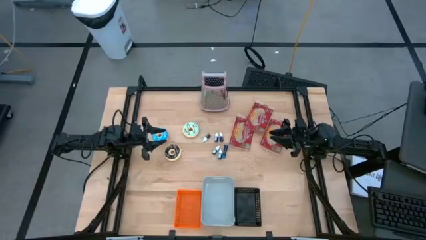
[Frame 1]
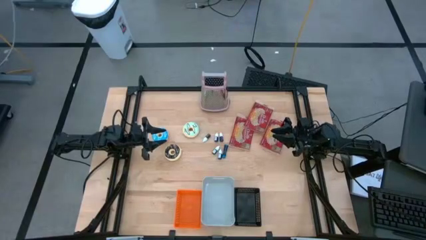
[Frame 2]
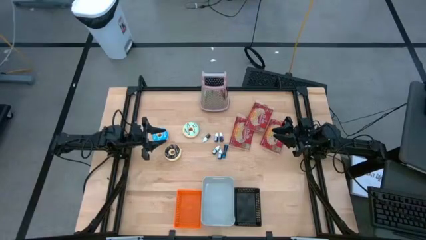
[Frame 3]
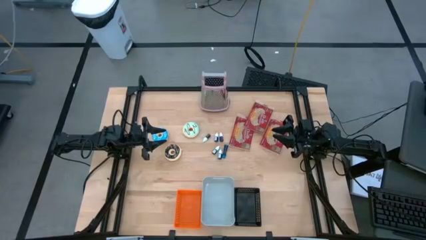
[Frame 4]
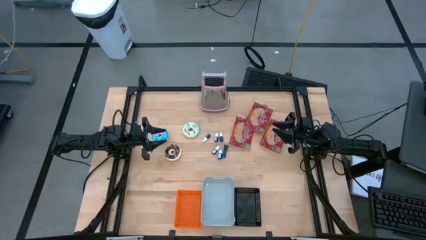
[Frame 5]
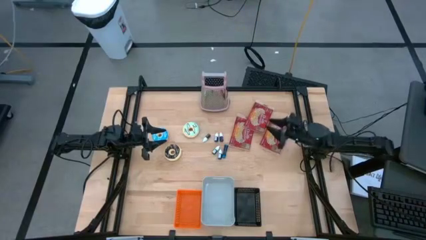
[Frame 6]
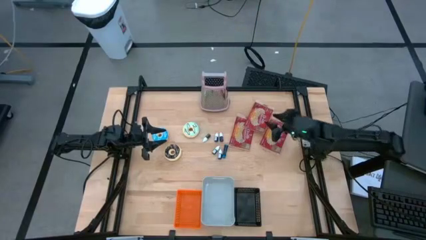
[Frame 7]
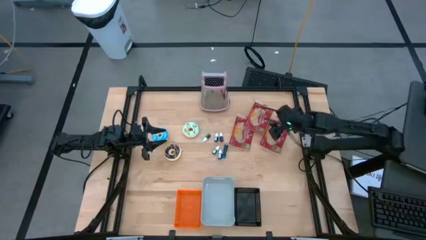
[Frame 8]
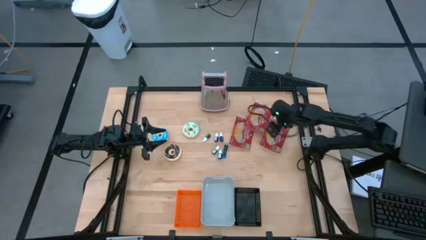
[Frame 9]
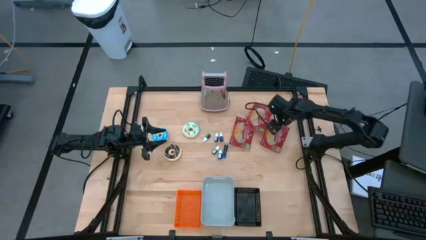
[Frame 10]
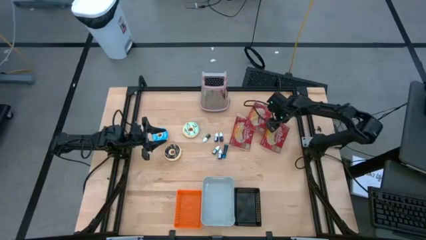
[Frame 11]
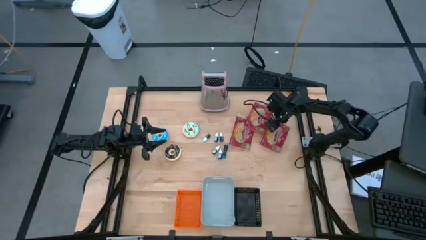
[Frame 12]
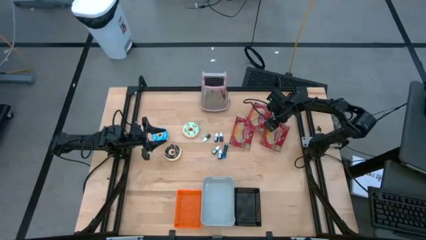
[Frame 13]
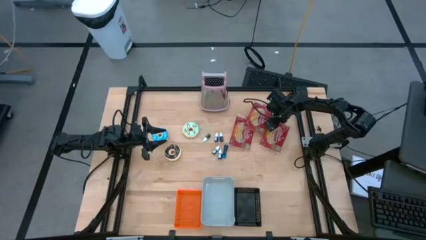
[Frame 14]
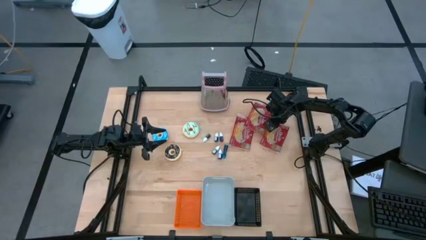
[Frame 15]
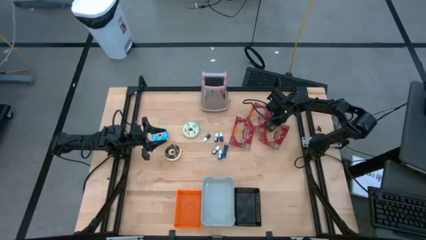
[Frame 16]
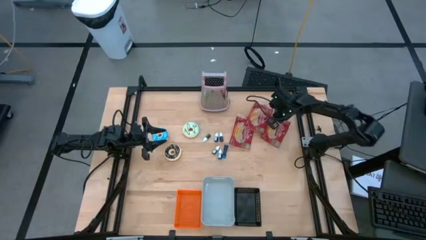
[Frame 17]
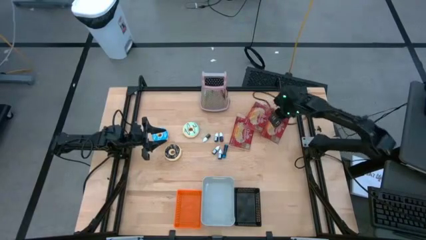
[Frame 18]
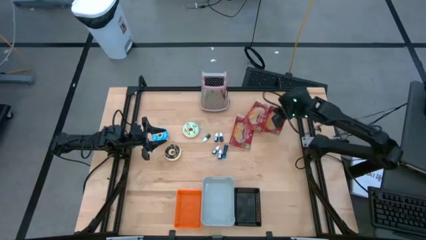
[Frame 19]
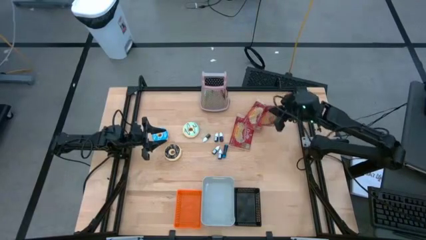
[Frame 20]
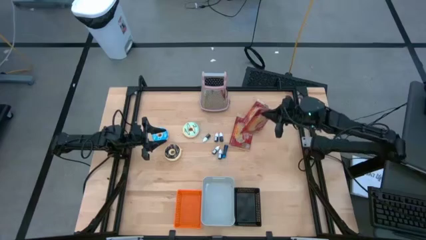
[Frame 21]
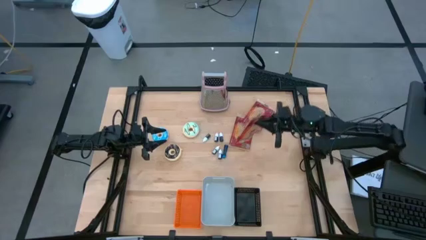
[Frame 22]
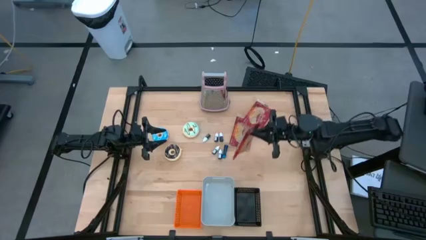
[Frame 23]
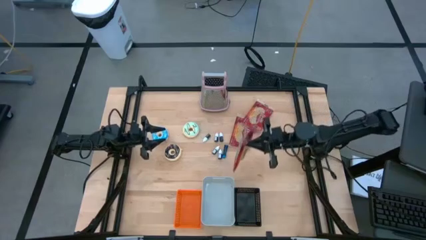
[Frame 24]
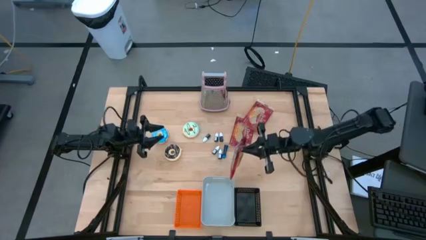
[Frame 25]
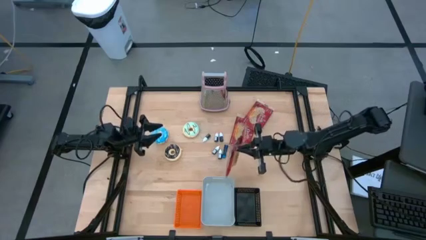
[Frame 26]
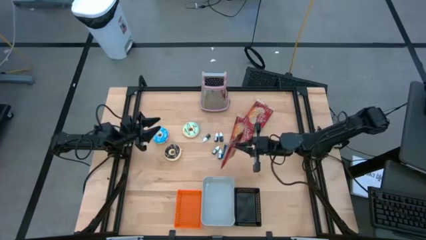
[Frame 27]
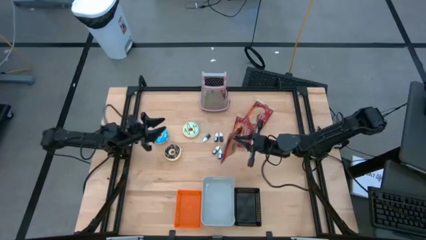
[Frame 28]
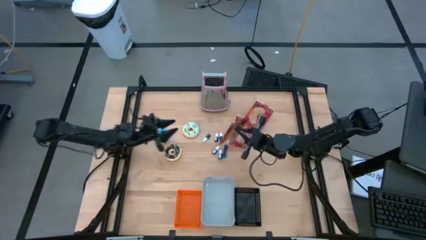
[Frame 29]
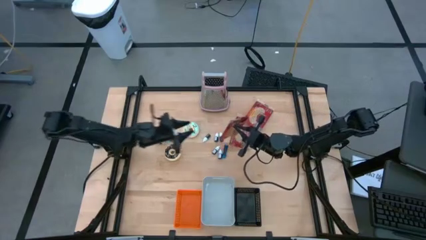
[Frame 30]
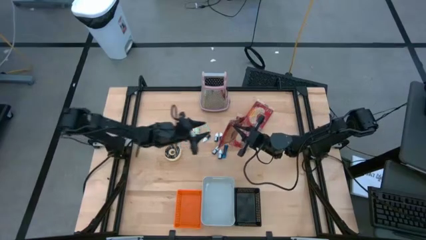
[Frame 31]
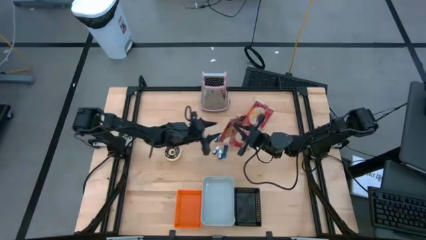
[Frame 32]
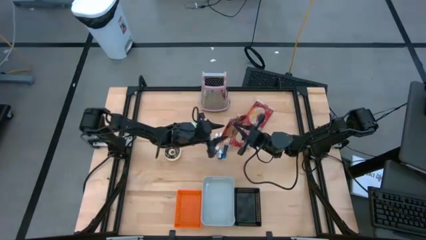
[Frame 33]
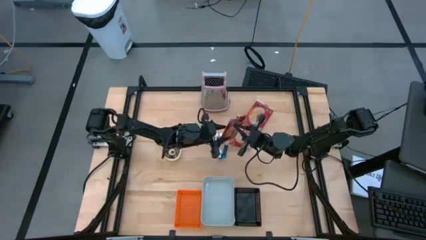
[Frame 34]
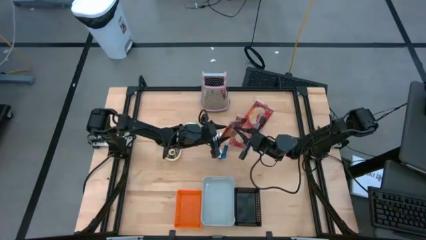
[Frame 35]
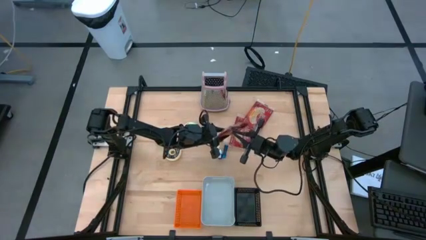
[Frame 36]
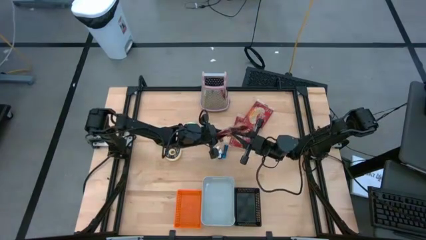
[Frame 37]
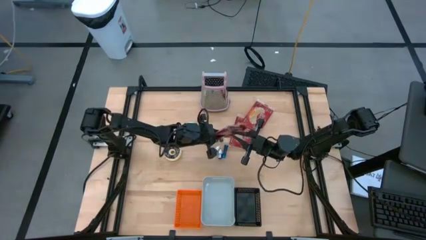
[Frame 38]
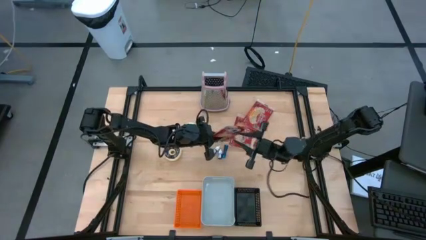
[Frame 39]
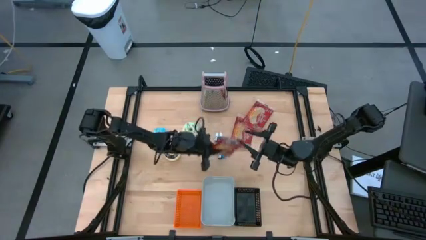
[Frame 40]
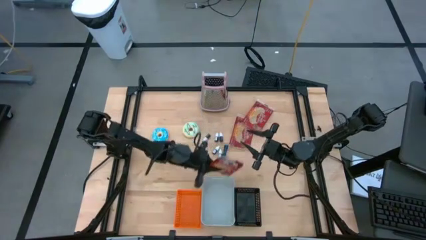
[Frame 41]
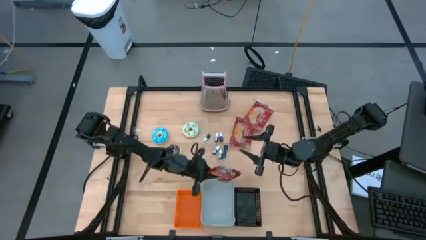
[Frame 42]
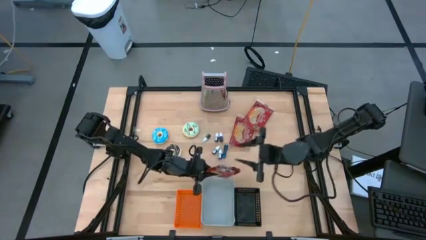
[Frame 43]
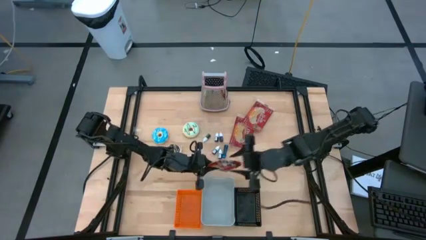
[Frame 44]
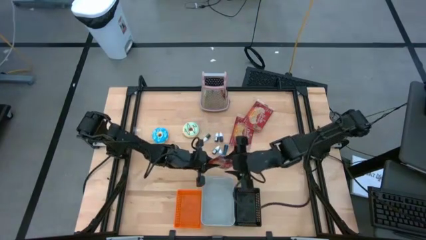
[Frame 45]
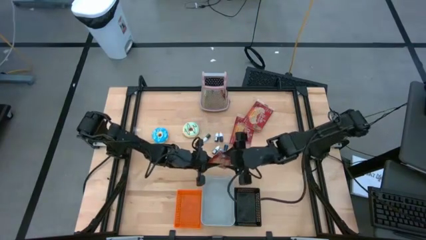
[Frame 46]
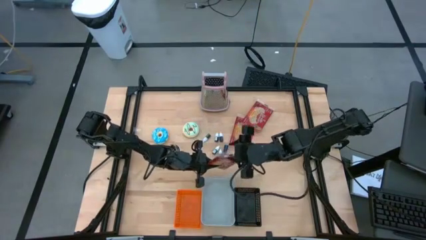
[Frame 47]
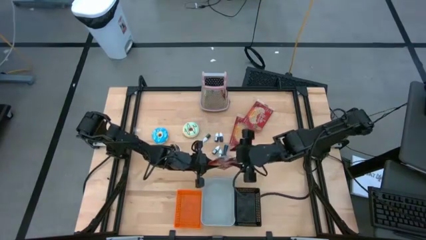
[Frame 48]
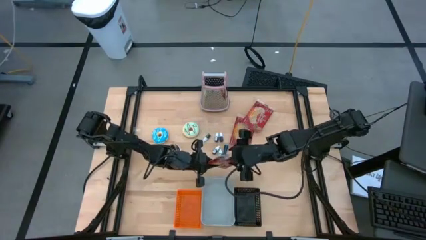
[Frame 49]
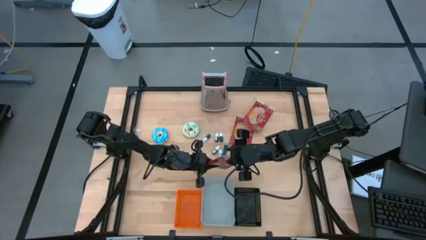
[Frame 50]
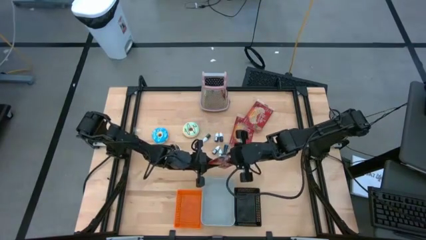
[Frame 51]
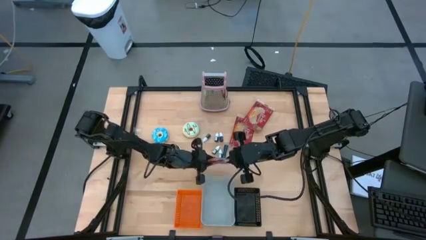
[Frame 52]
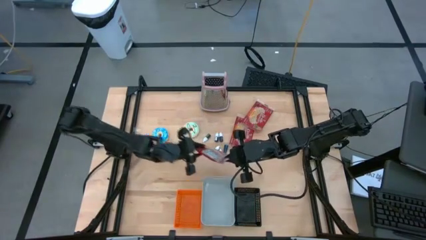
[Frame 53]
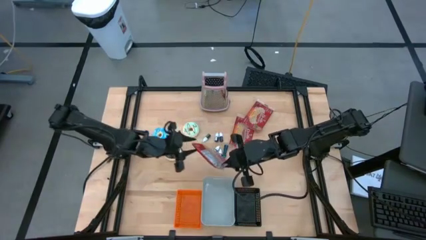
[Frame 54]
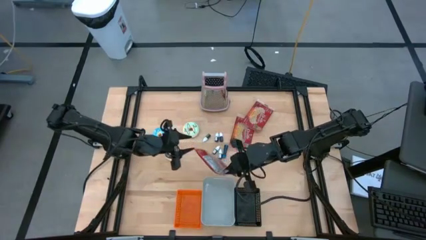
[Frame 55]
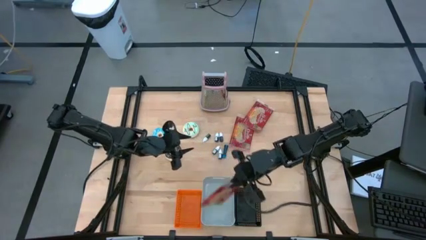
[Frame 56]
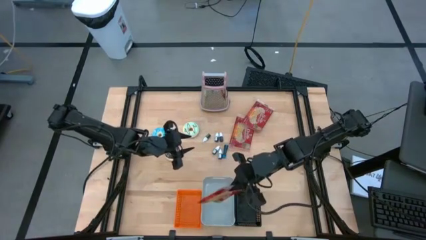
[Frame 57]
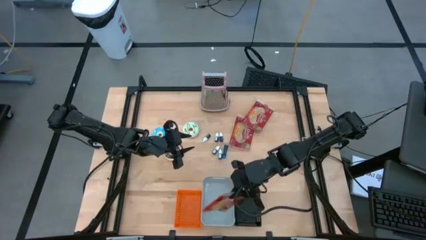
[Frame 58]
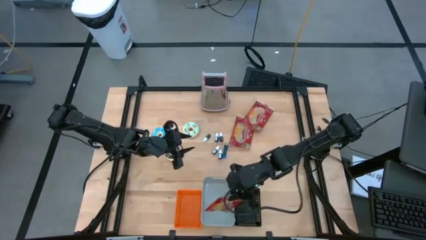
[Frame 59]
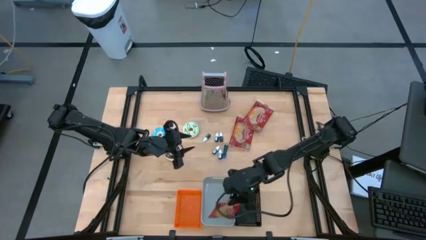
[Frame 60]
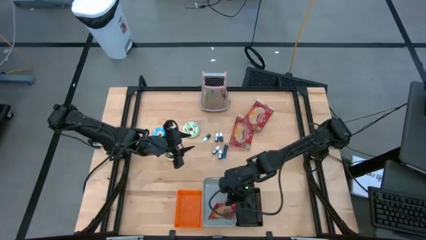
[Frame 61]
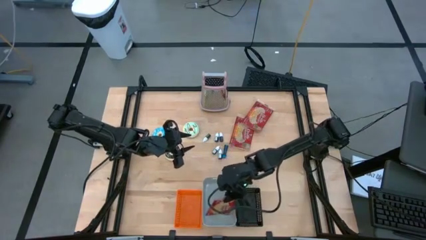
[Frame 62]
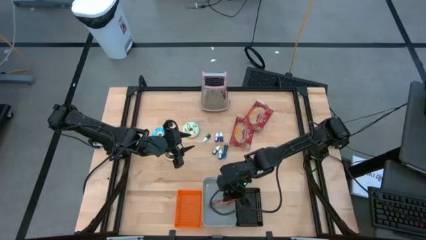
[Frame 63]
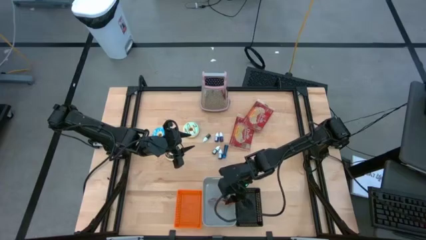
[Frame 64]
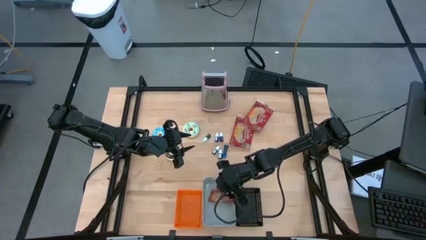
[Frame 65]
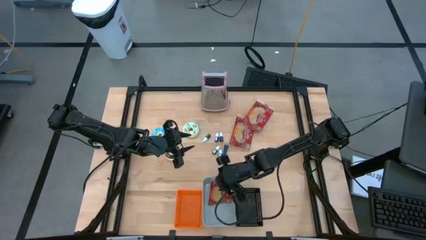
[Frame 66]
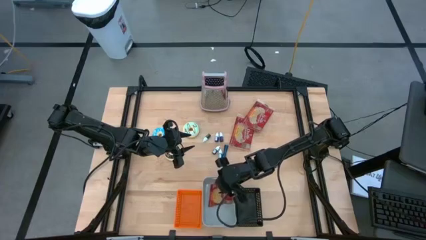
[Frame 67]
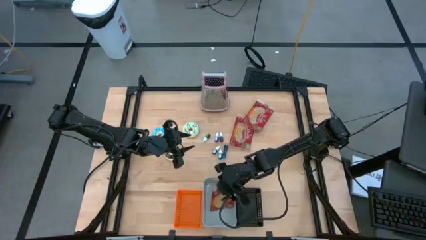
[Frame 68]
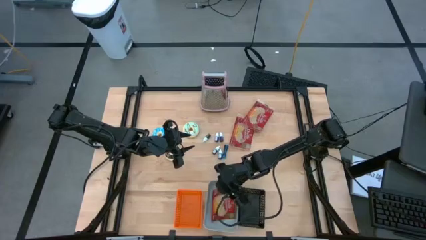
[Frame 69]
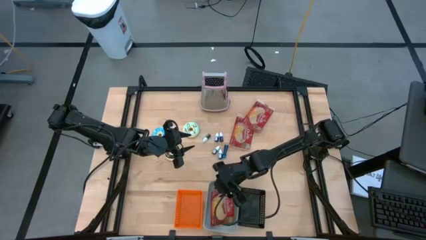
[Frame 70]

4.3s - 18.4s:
Put the right red popcorn bag into the gray bin
